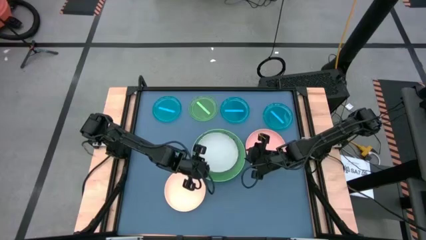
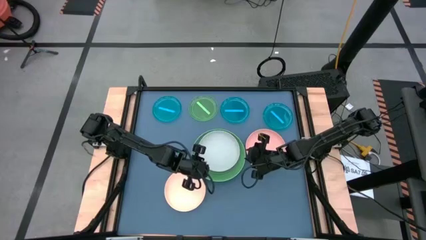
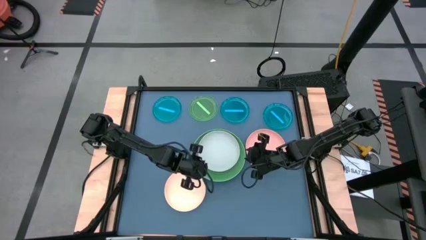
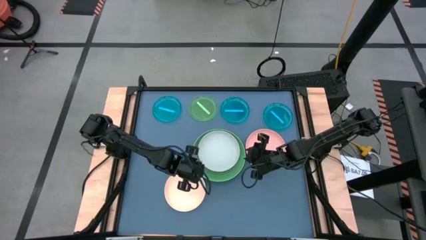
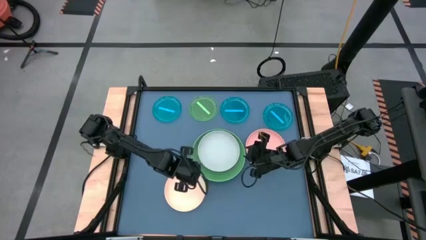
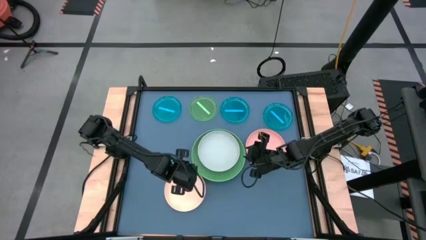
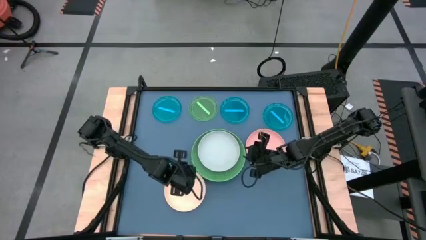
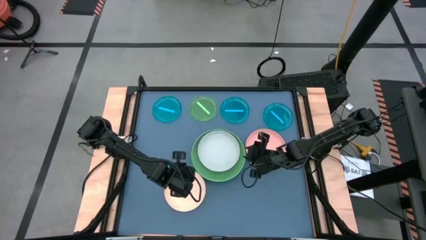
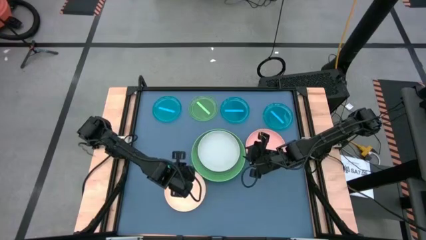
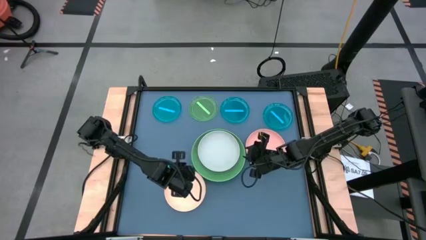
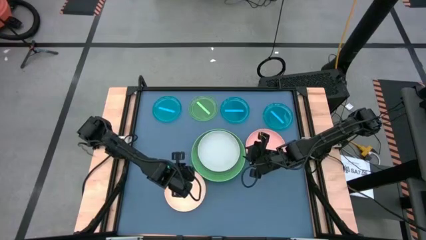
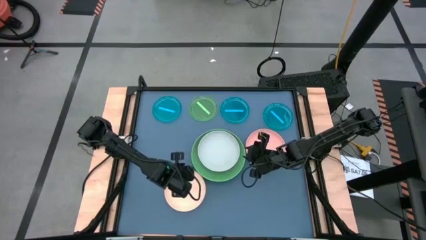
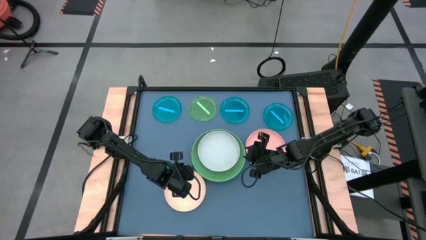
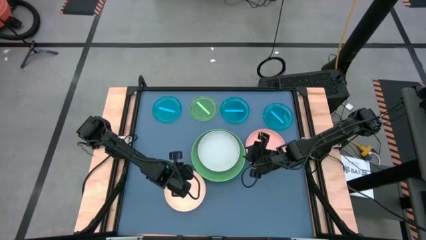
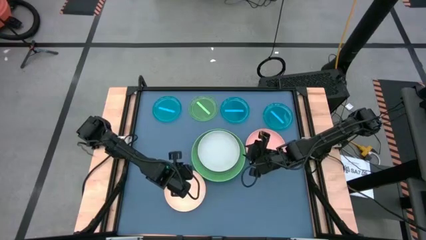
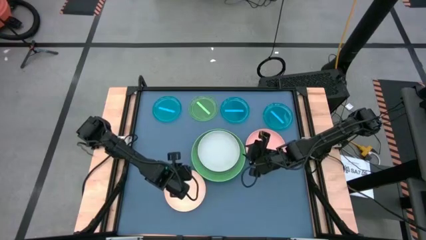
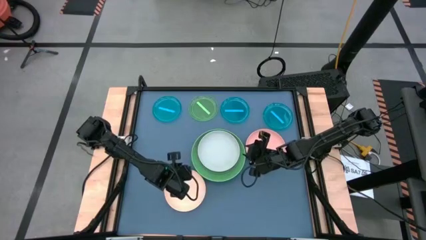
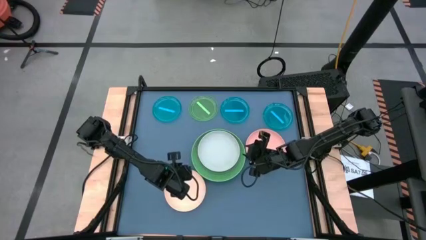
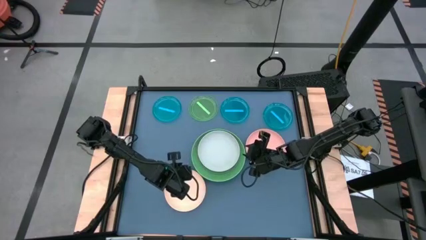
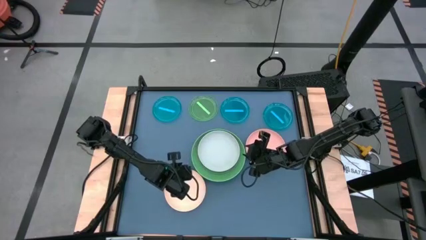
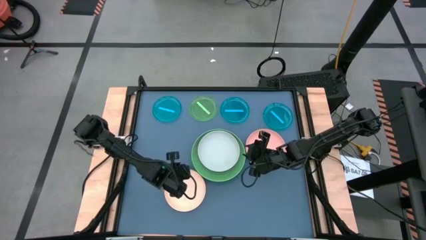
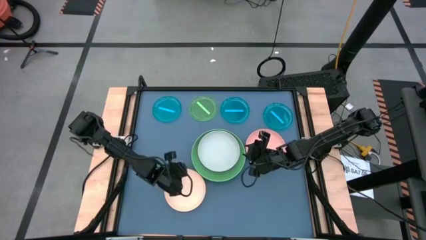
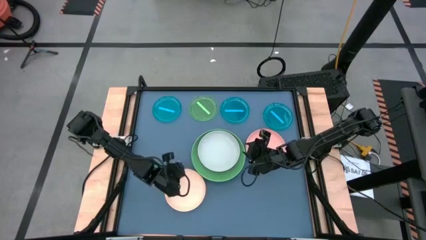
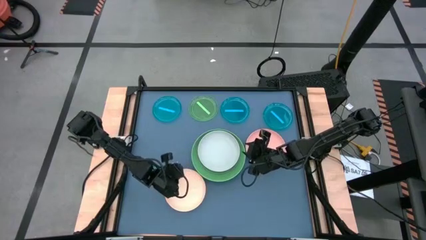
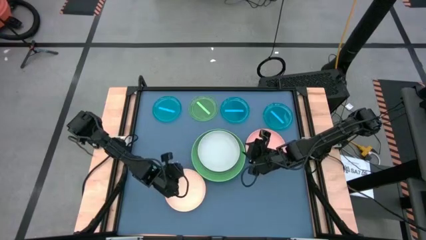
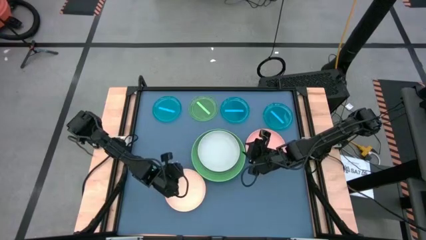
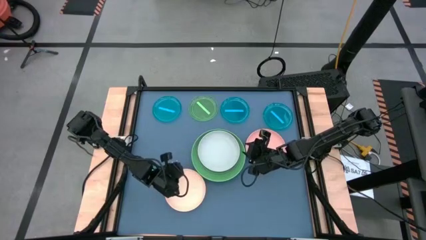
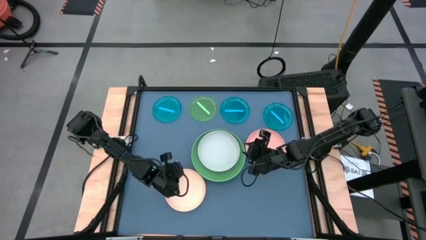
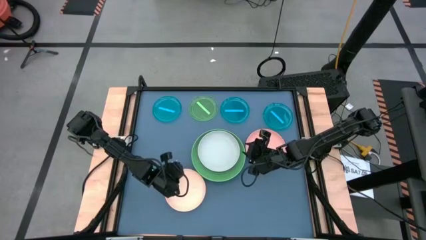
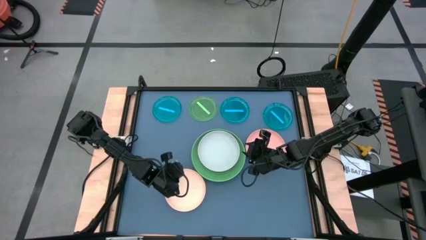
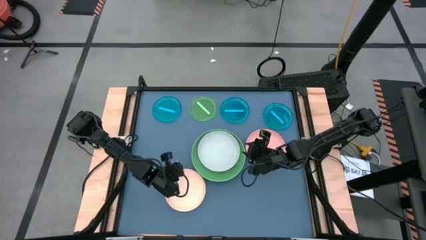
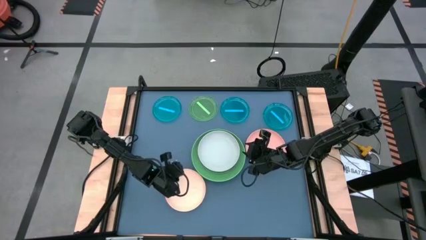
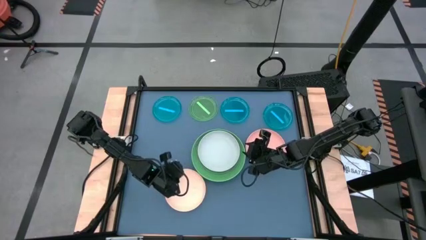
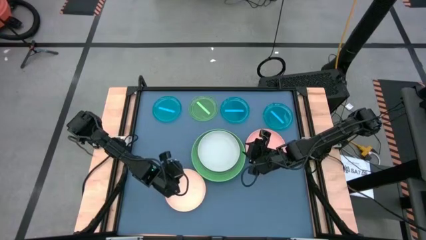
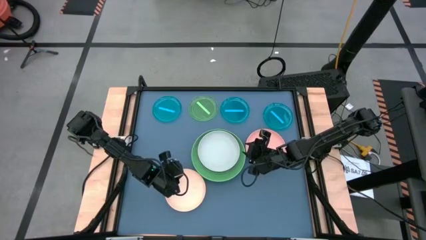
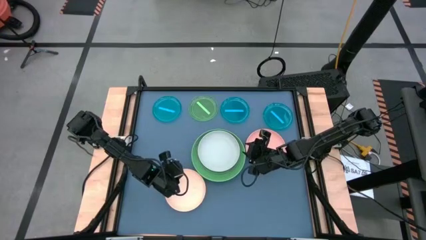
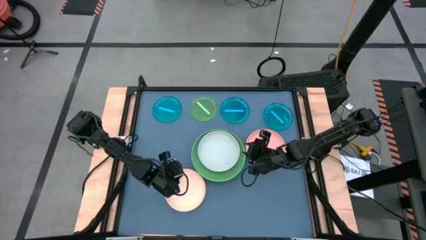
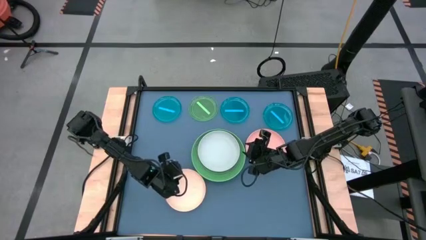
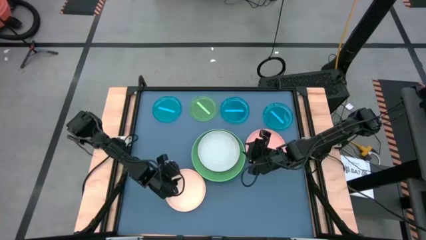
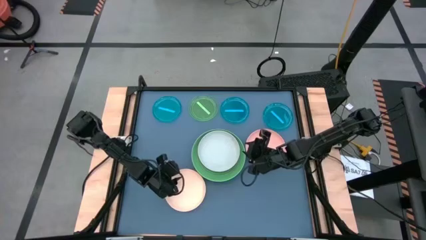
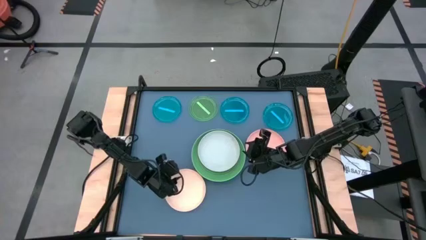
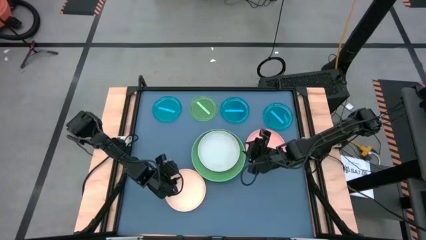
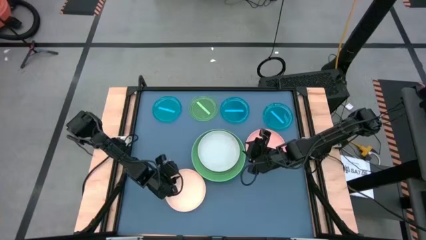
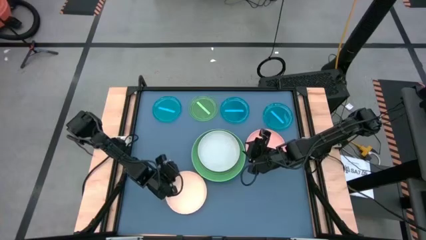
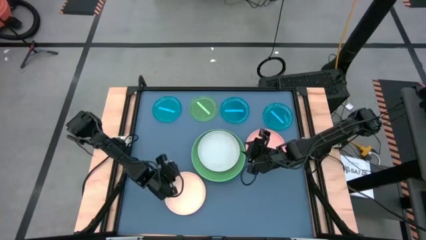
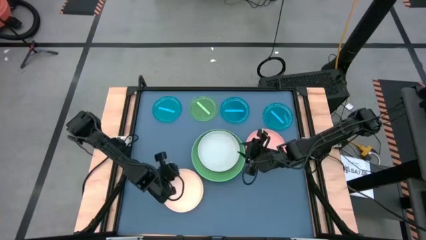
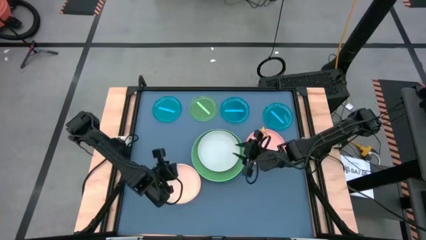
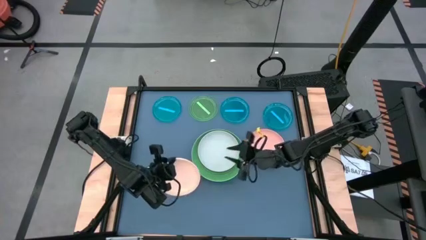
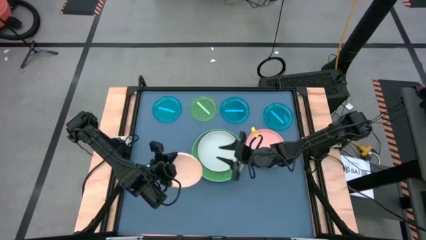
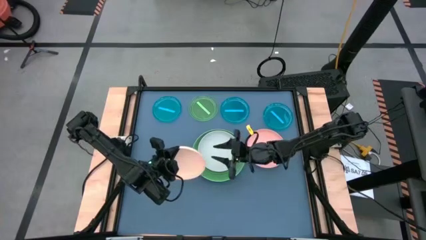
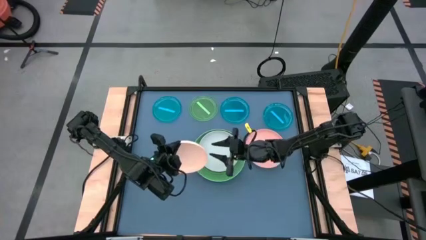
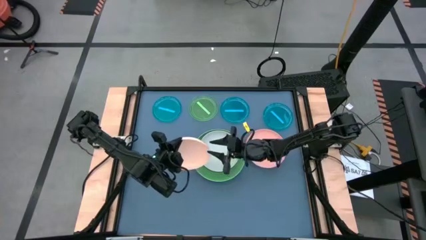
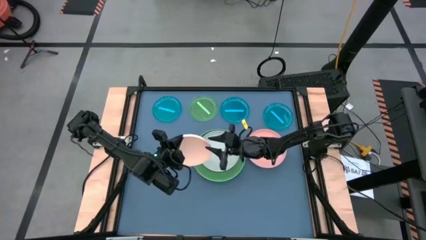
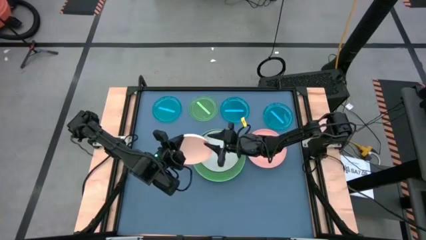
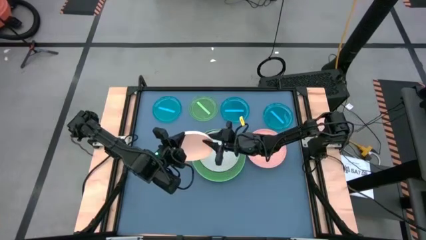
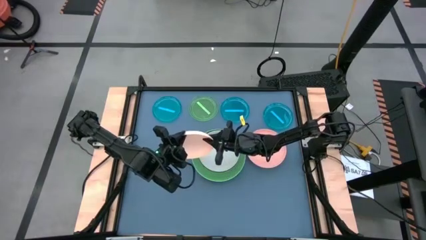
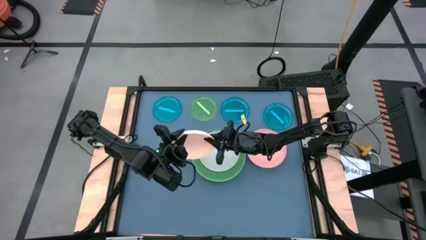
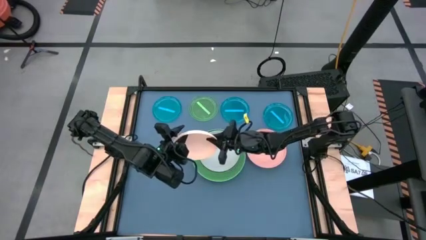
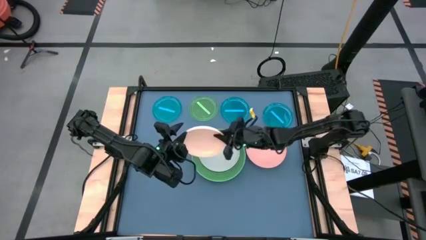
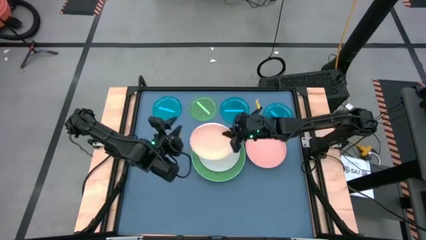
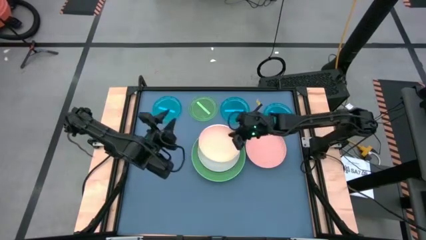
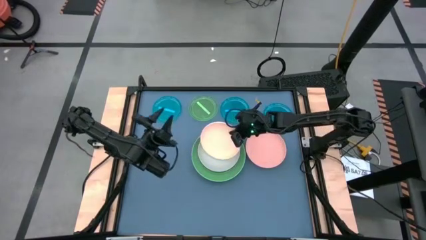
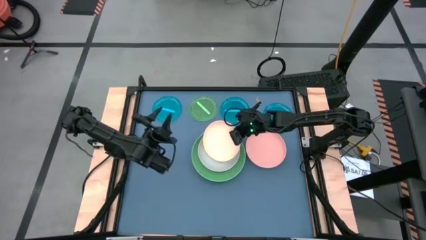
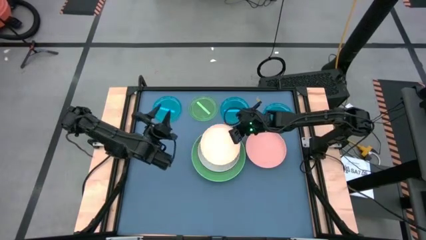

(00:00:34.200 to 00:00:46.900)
Task: Stack plastic plates
Stack the light orange plate on the gray plate

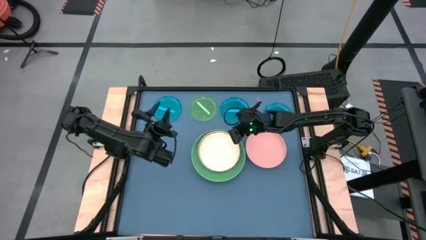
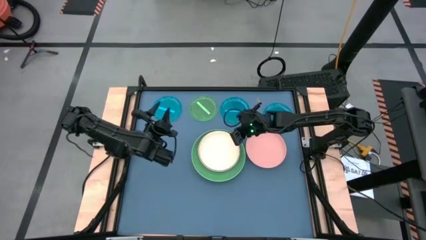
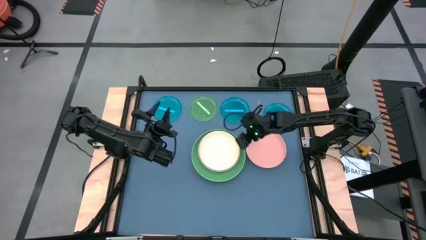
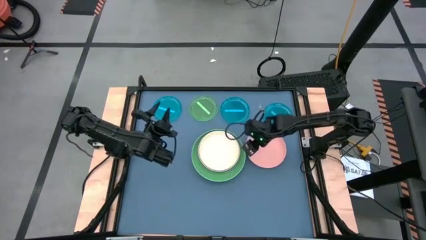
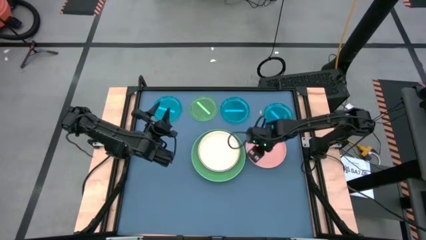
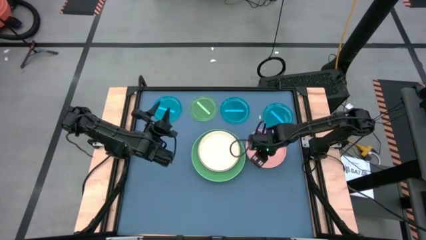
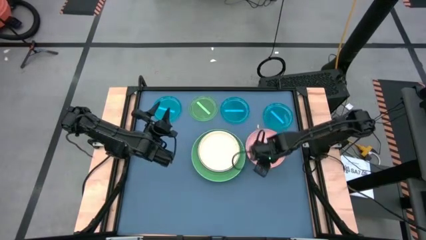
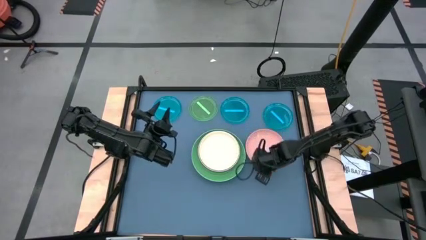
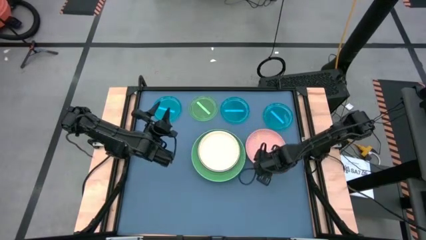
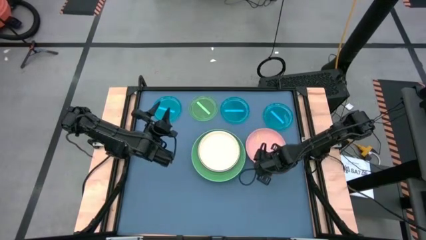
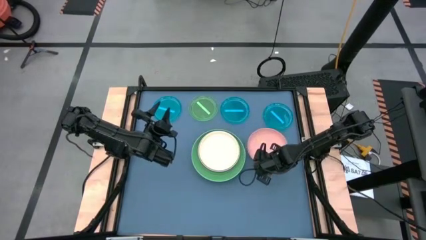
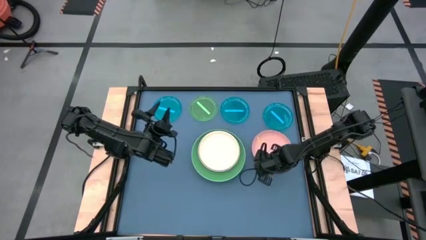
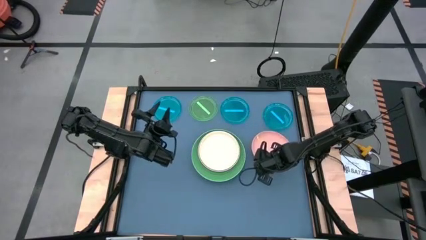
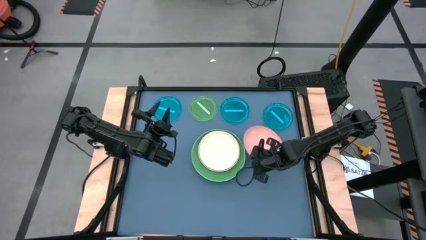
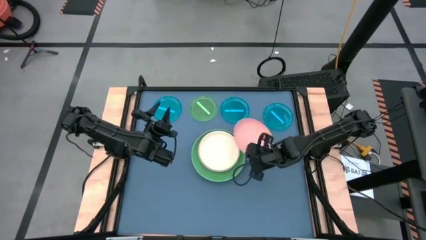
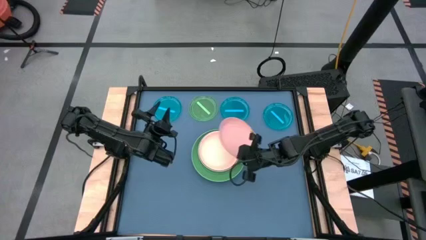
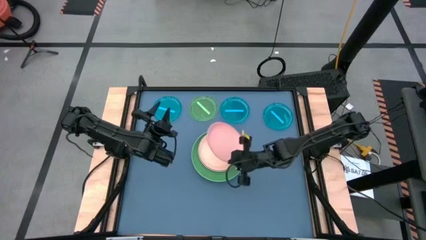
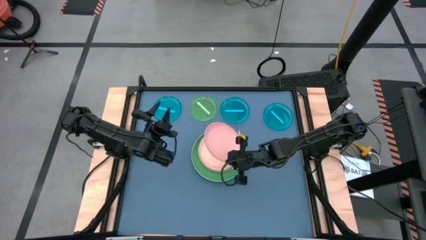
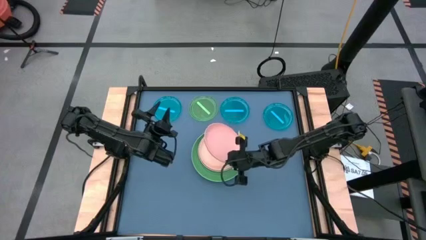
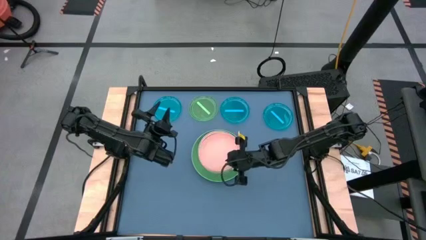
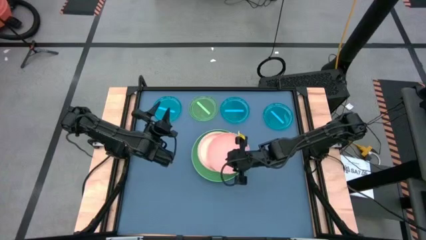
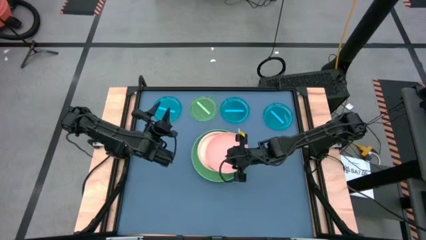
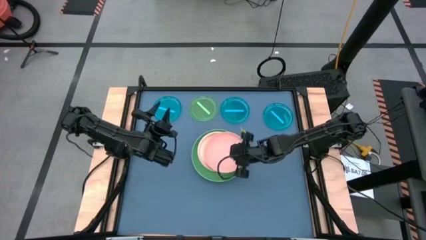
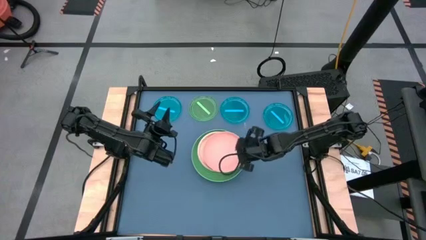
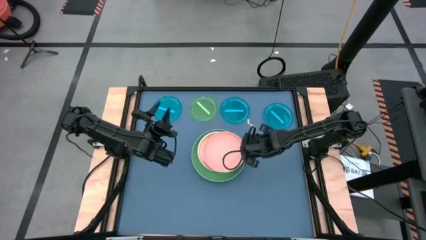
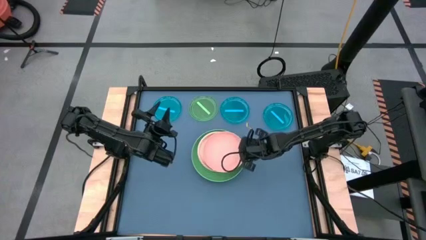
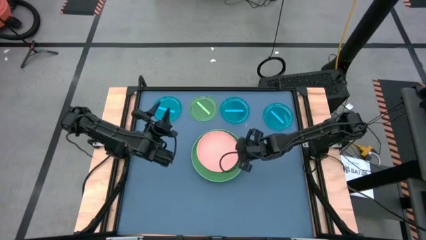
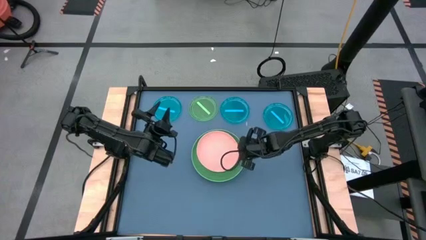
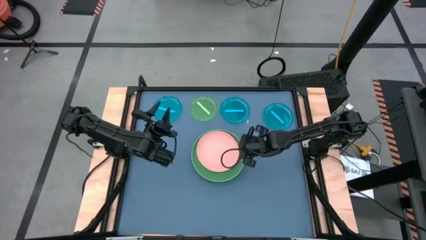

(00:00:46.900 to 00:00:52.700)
Stack the orange plate on the light orange plate
